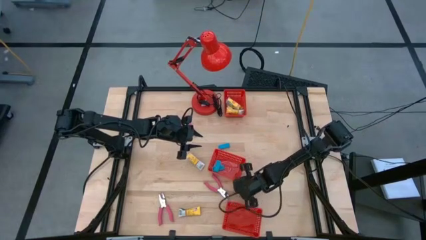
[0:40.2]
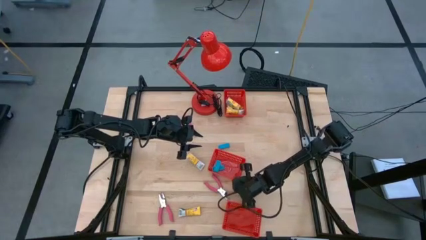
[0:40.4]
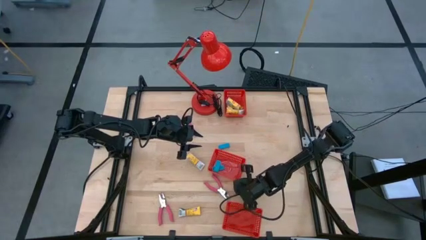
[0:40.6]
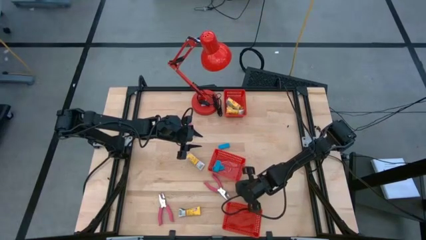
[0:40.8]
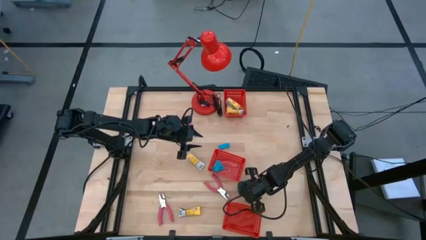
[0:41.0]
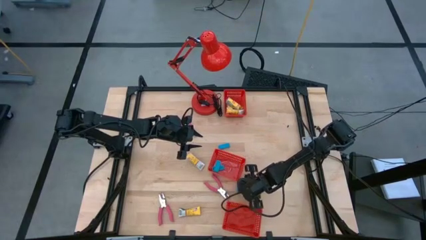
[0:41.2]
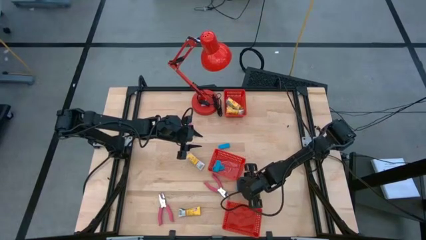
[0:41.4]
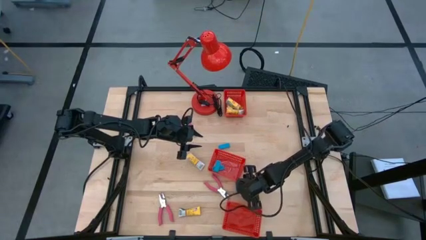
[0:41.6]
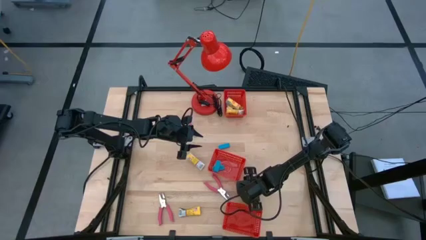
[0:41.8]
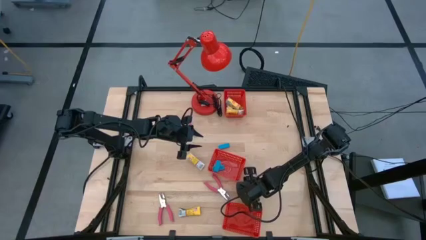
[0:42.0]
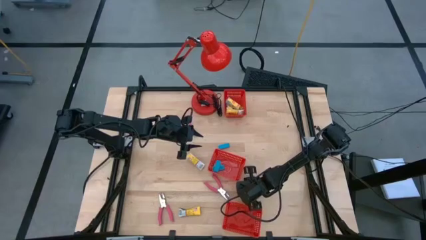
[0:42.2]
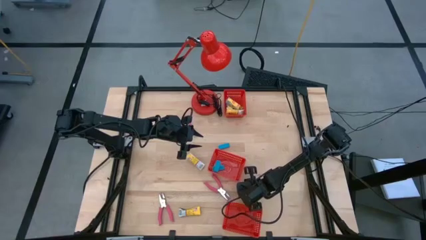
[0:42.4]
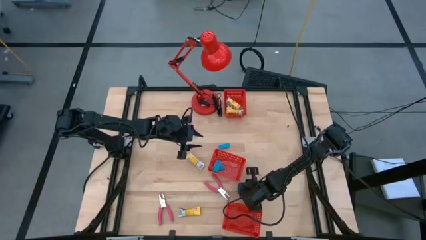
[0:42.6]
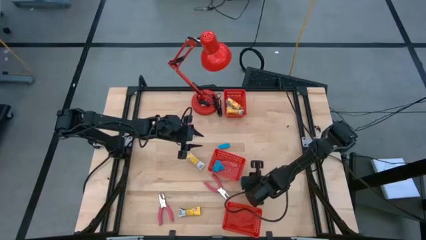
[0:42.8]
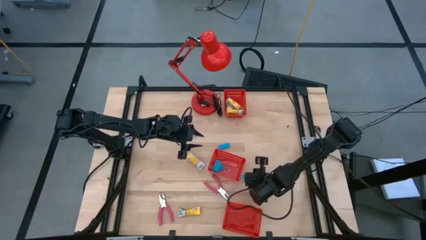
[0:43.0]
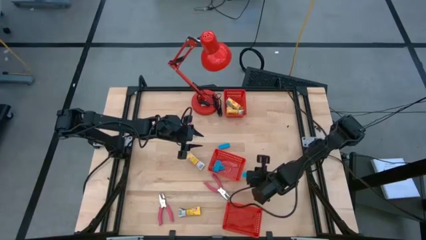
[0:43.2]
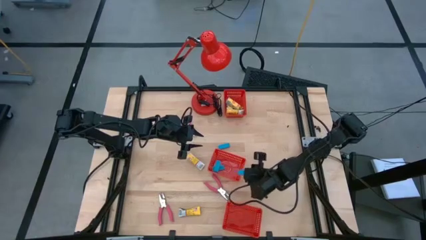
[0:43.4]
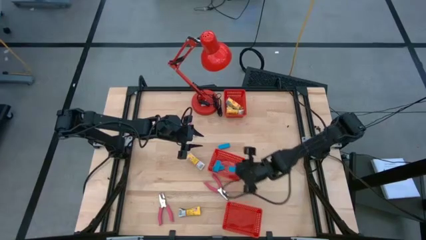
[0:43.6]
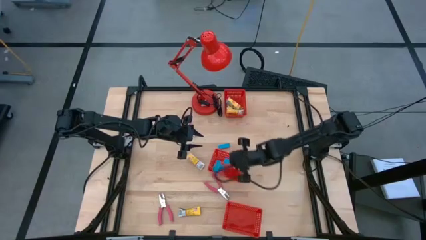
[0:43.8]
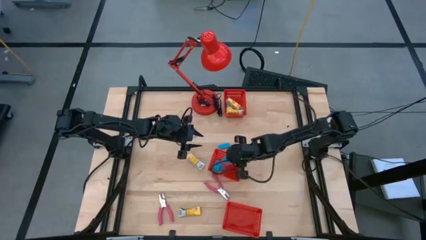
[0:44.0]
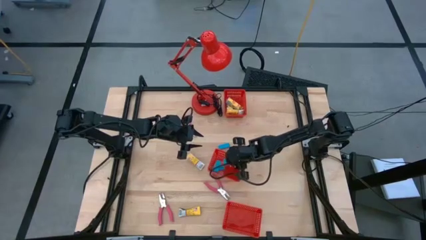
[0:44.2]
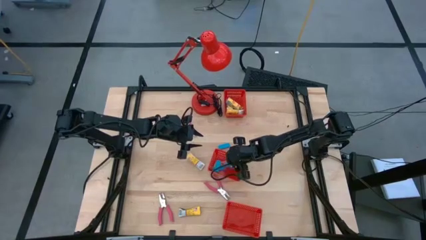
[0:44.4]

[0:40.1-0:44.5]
Task: Pick & Place School Supplies
Put the blue eraser into the middle red basket

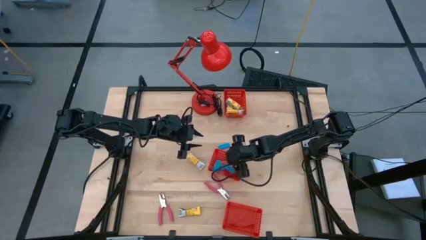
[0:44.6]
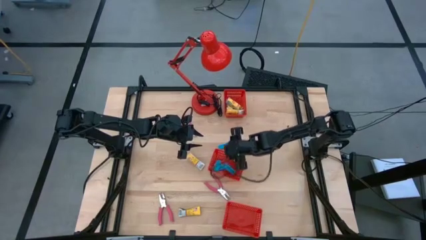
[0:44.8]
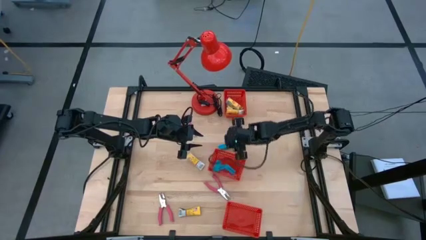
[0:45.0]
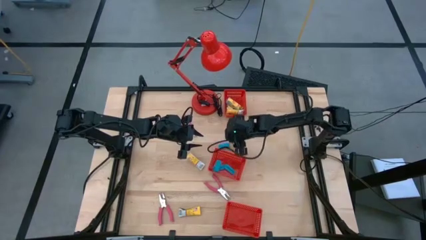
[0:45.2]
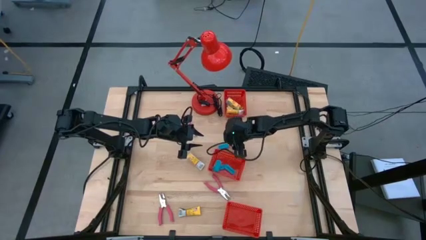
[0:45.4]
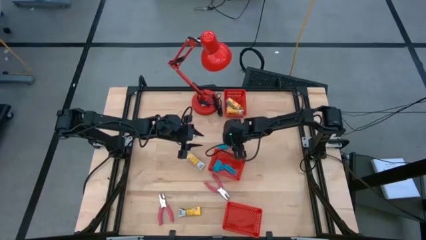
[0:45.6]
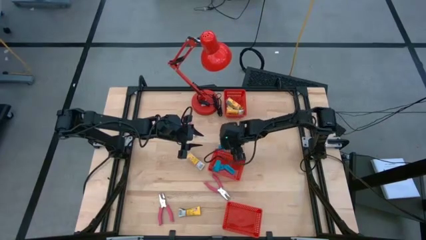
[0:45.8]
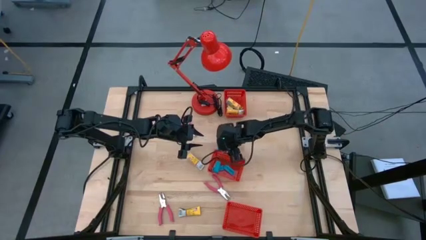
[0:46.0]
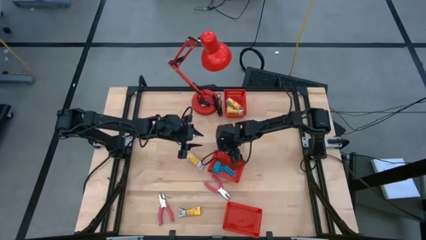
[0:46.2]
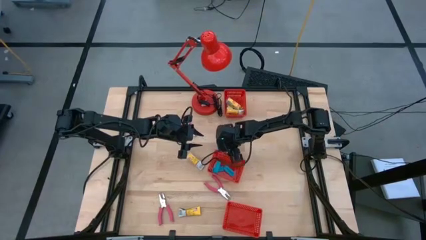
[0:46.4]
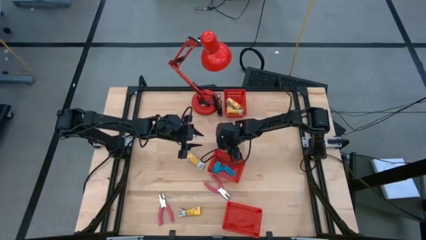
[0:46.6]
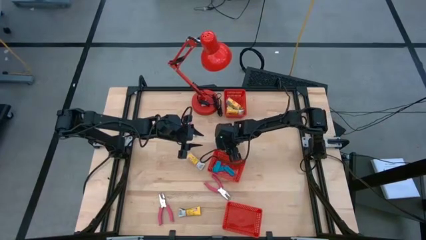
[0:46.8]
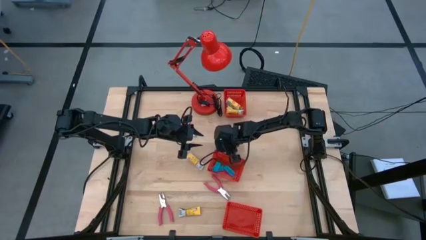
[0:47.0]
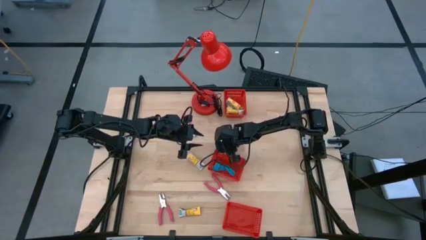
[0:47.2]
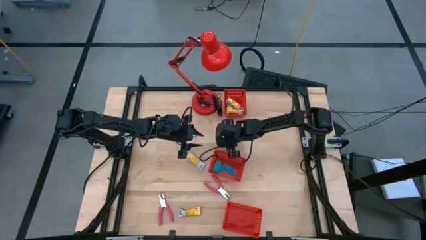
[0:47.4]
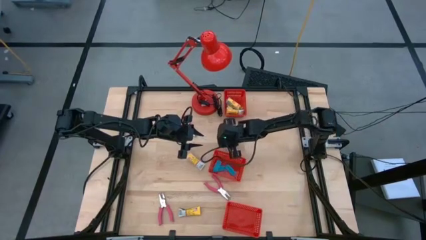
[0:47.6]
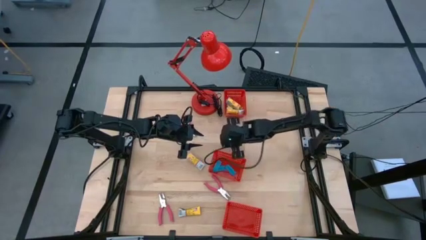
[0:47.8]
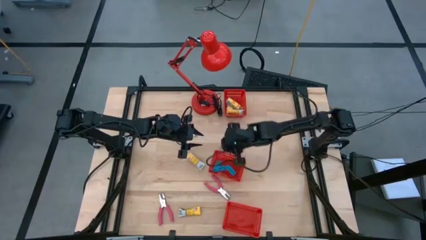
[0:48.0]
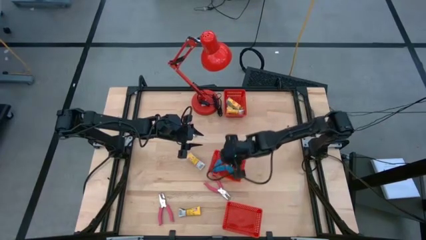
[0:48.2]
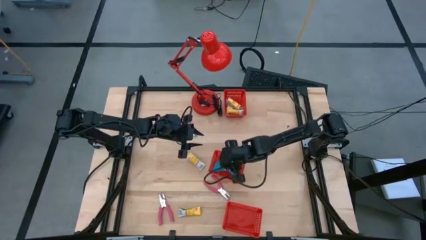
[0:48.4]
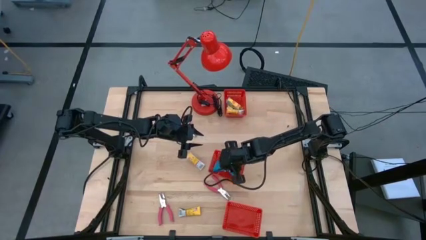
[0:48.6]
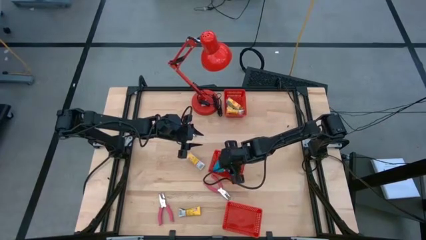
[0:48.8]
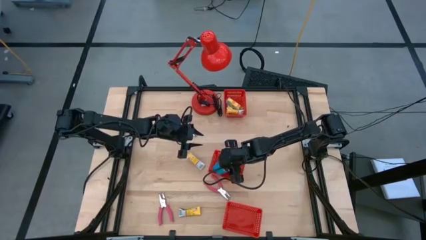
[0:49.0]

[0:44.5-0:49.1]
Put the blue eraser into the middle red basket

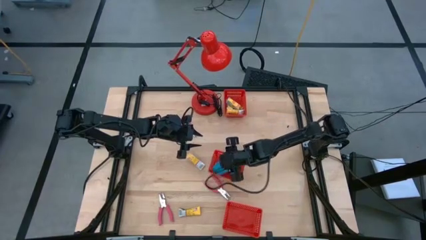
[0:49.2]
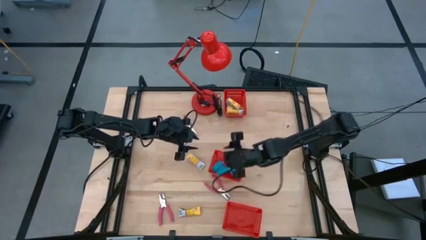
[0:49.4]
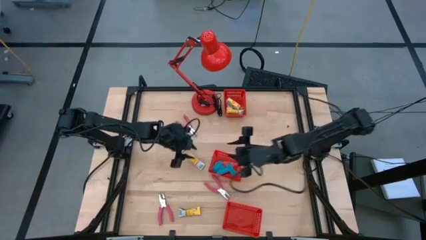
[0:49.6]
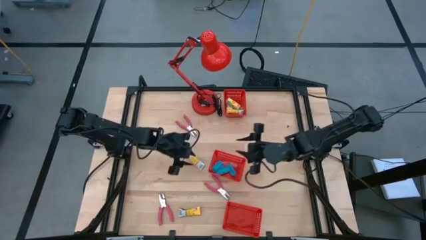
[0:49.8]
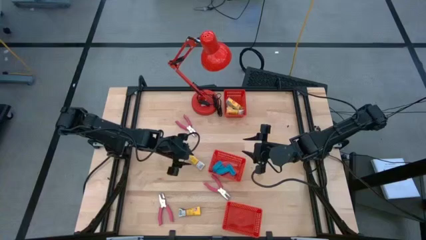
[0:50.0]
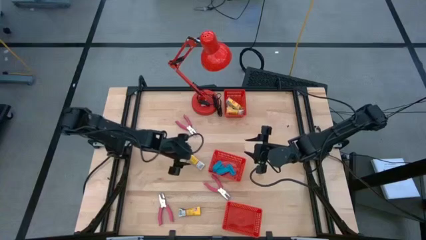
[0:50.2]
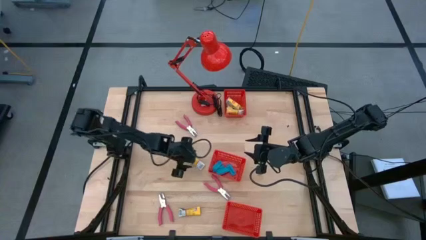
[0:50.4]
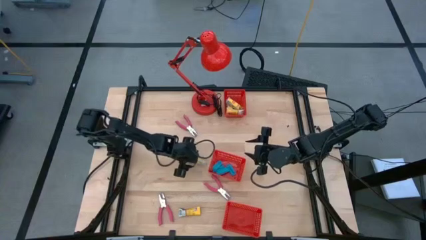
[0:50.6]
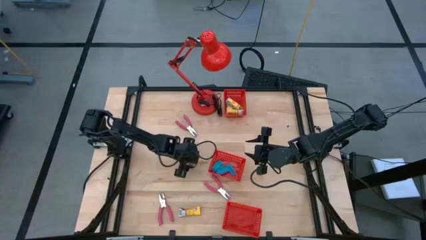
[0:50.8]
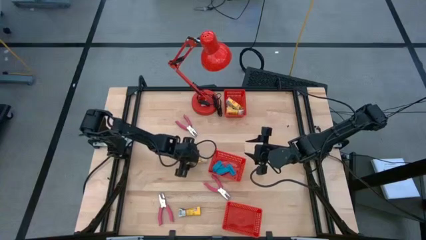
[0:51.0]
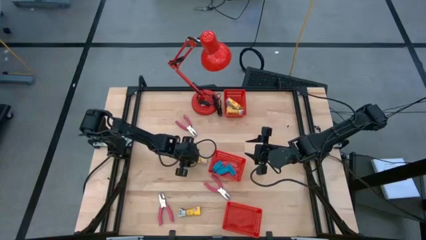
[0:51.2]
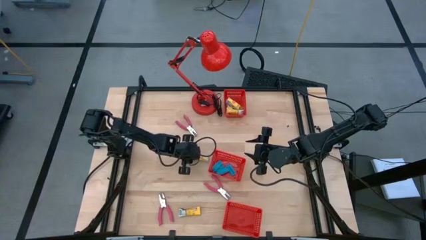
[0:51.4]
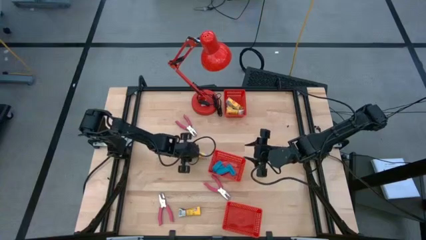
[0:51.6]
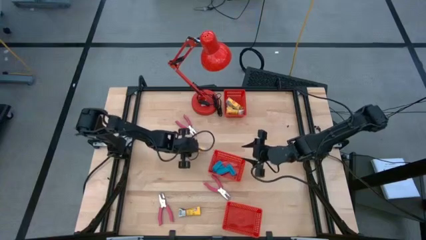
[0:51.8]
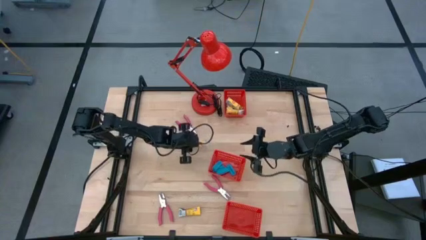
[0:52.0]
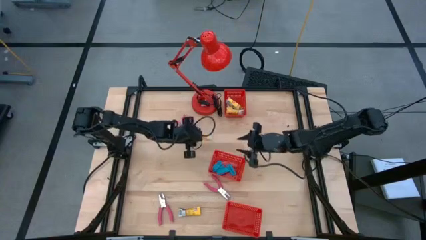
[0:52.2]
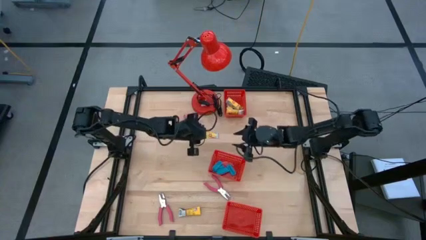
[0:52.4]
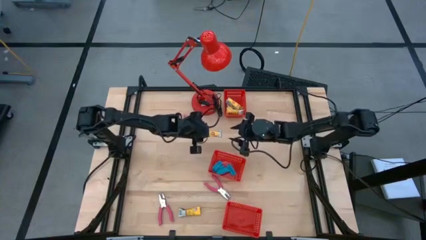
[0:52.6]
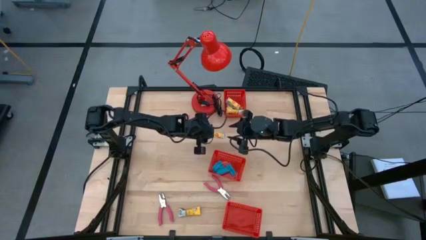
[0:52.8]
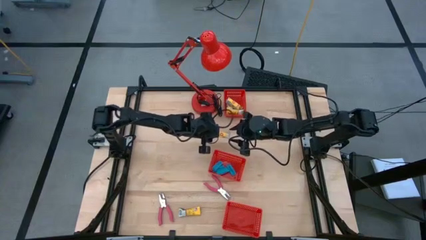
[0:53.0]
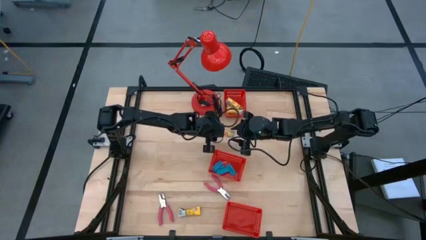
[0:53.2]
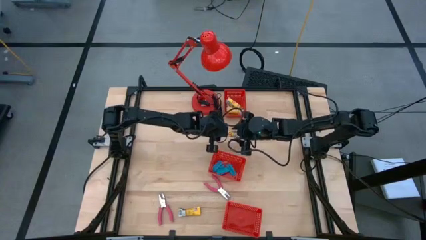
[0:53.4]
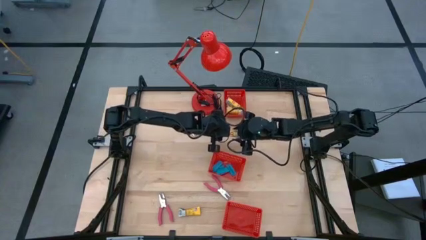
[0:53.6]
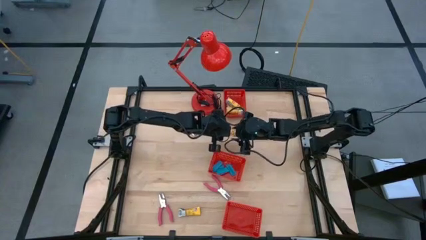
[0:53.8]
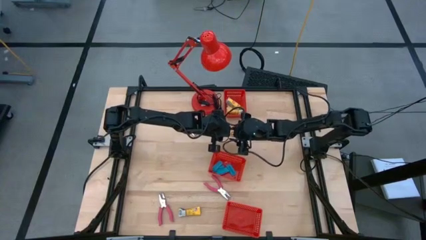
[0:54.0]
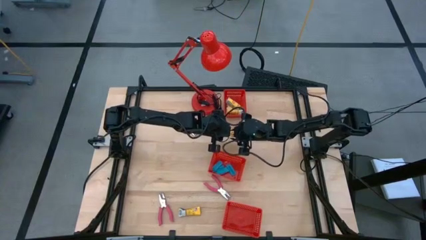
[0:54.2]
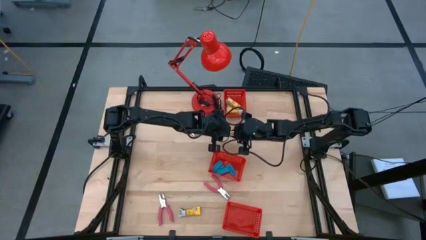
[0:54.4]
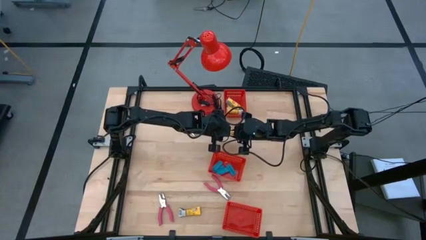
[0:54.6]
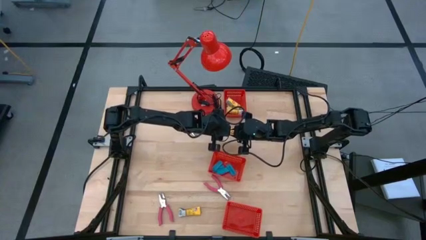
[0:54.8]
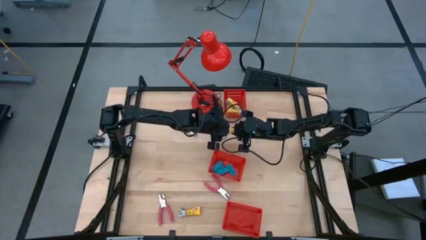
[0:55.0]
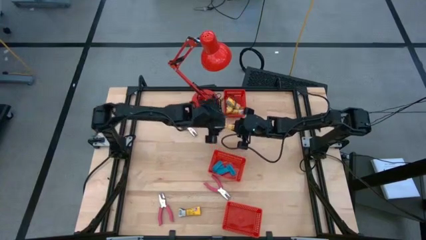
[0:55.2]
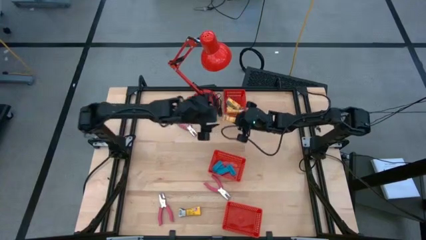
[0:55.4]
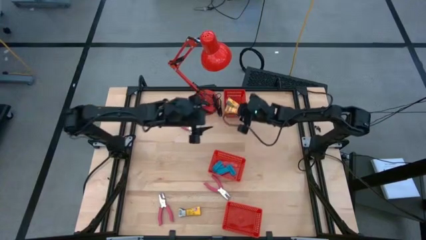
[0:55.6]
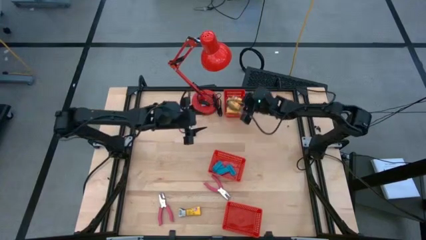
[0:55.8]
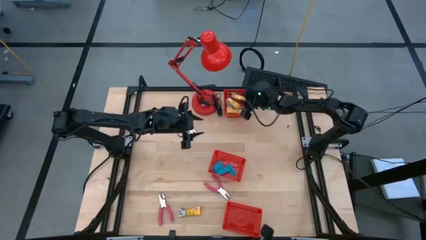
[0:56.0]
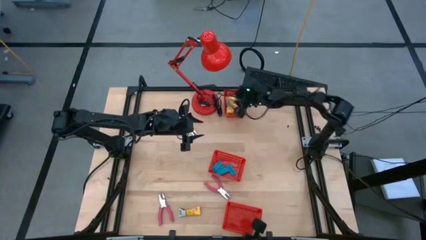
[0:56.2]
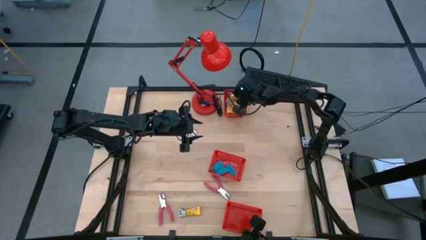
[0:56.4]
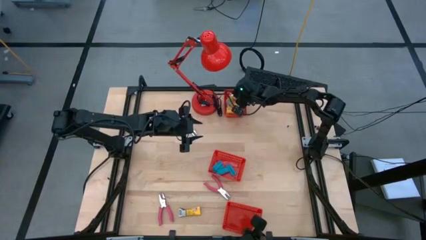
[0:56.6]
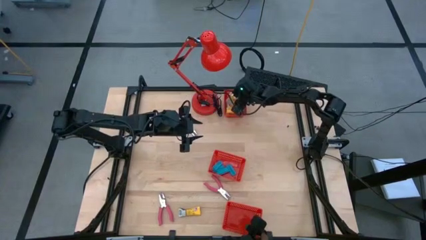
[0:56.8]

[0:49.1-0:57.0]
Put the yellow crayon pack into the top red basket
